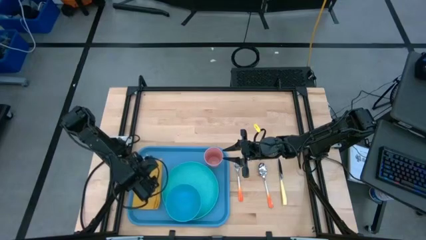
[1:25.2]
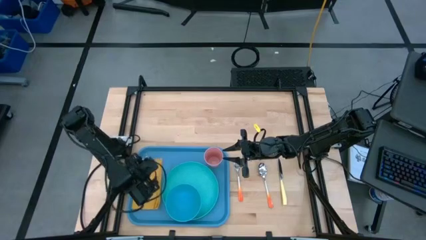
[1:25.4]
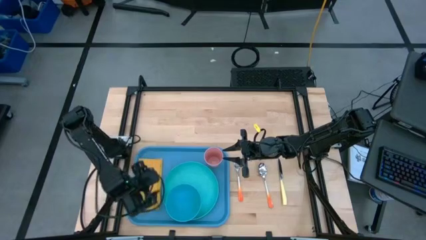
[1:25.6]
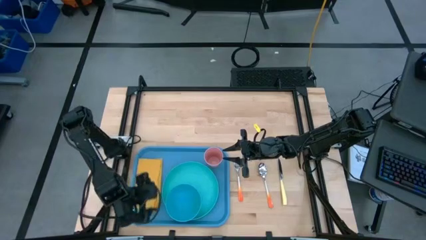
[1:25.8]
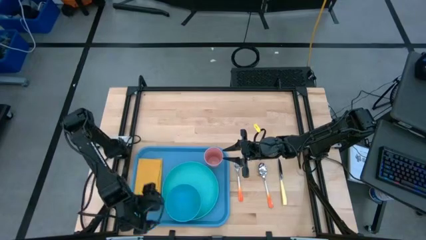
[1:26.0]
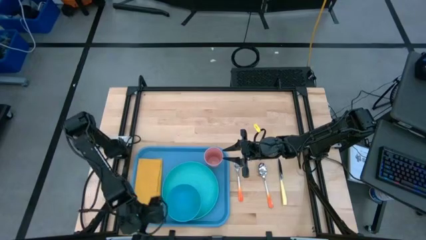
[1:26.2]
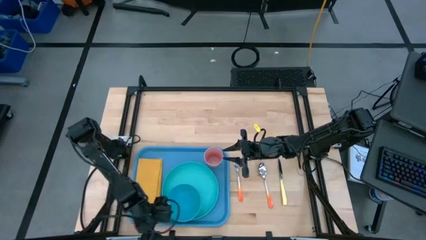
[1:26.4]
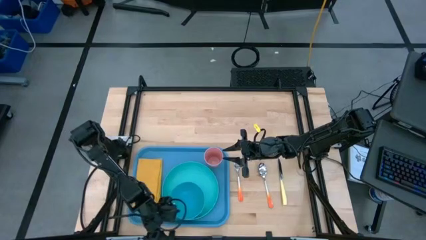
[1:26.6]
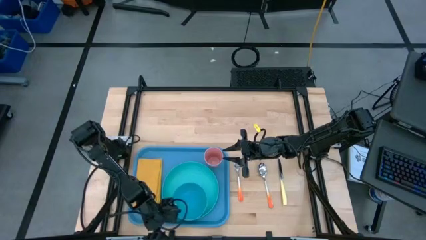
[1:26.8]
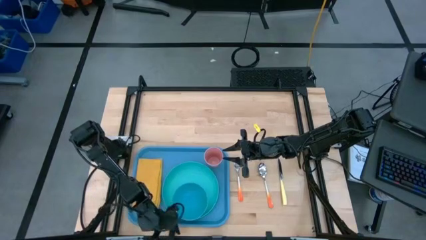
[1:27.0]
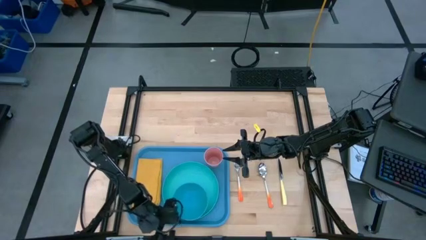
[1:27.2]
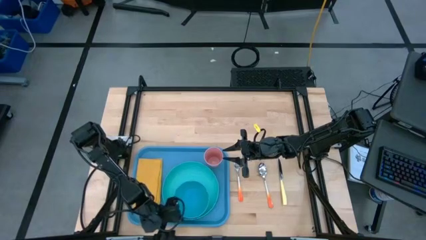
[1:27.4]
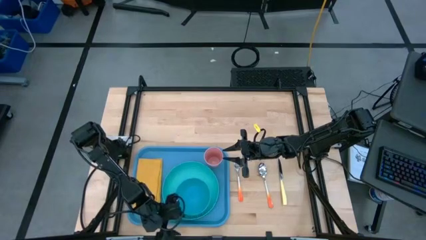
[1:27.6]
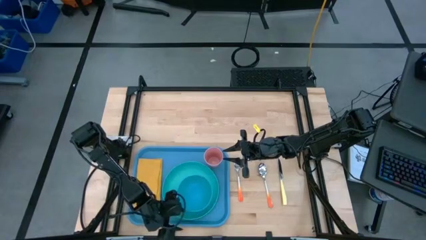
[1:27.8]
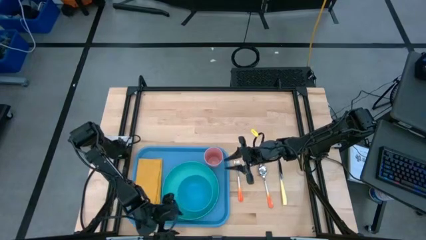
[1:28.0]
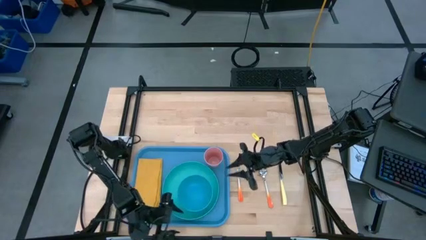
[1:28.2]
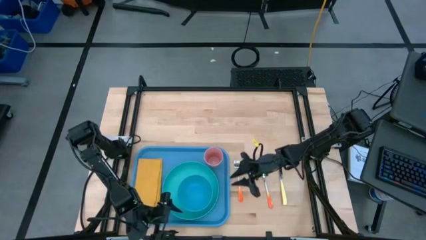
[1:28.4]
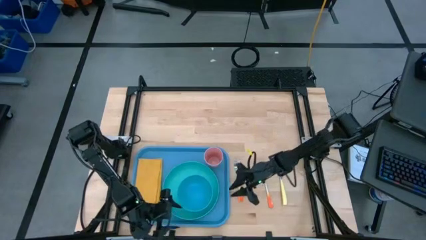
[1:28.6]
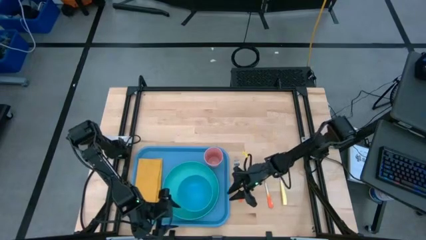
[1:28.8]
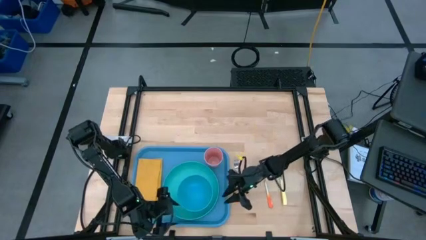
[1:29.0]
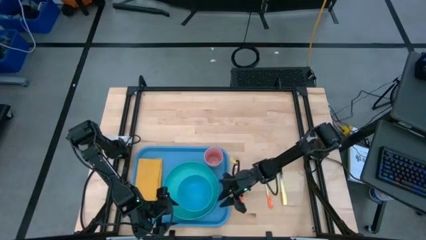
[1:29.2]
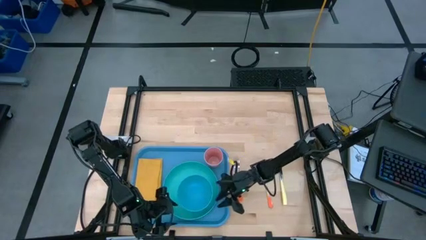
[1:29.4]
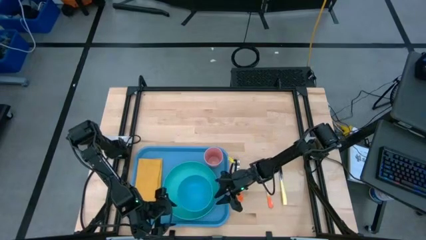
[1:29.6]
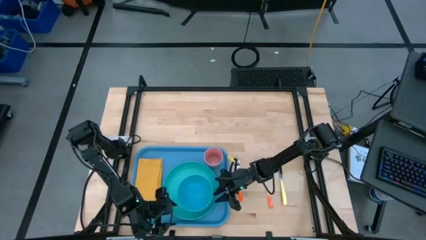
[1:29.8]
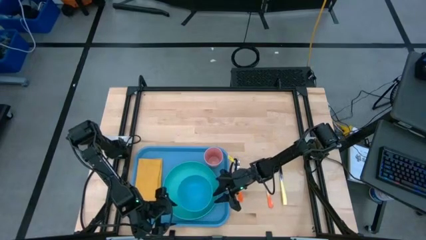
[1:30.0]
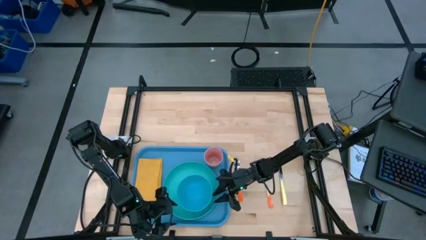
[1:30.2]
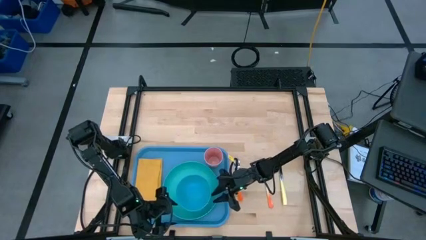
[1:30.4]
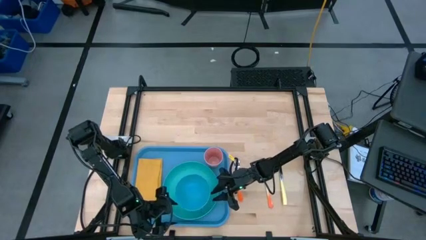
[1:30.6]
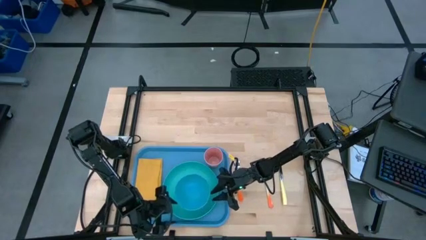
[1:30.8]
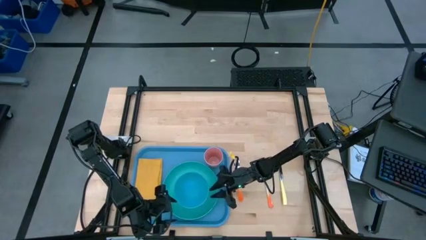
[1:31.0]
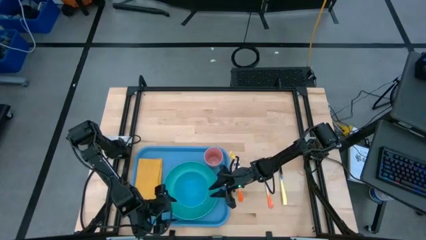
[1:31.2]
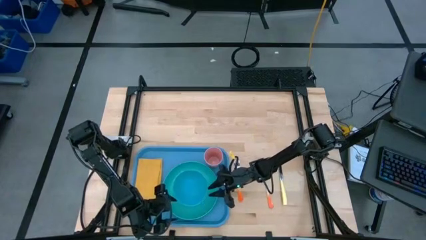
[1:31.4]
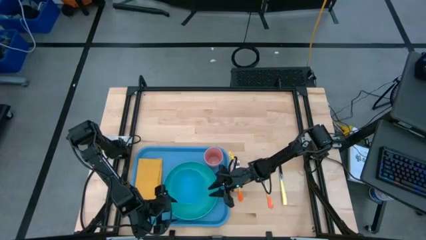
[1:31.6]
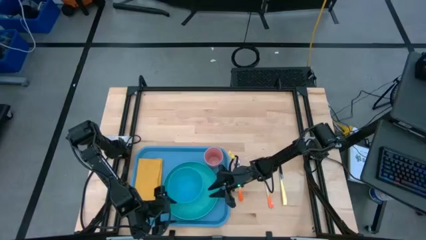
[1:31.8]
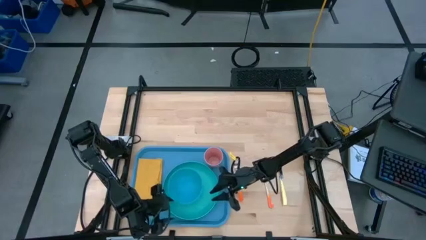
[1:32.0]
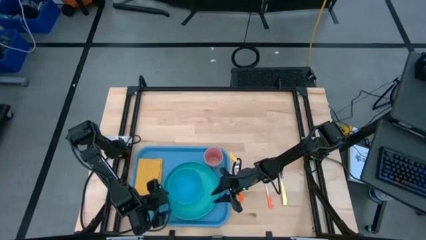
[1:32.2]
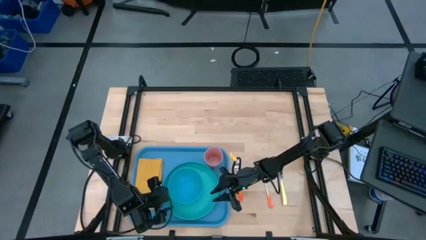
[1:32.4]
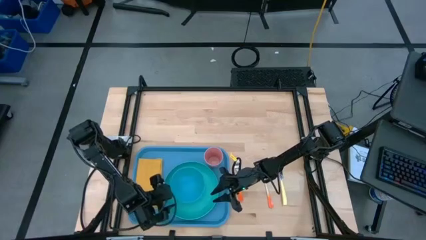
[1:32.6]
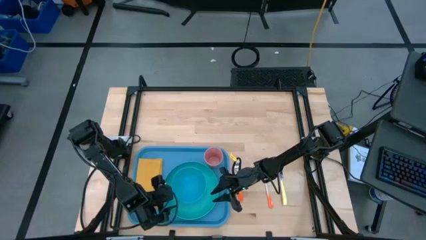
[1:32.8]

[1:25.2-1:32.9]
Task: Set up tray
Adjust the blue bowl on top of the green plate on the blue tray

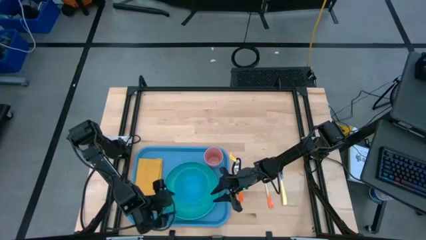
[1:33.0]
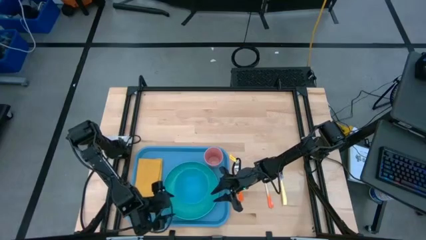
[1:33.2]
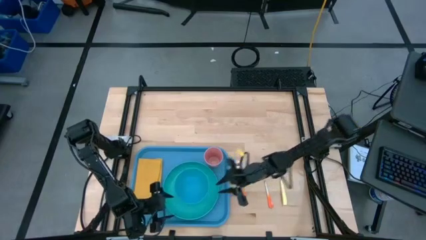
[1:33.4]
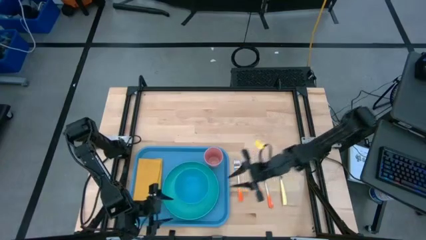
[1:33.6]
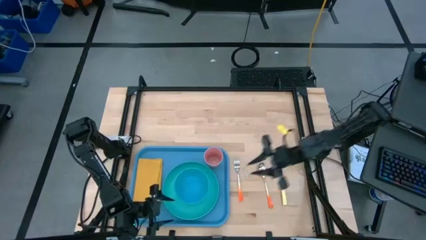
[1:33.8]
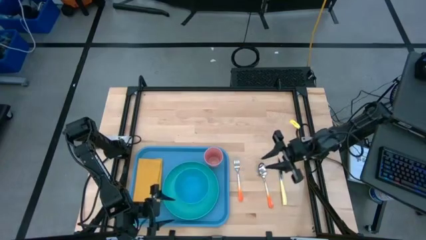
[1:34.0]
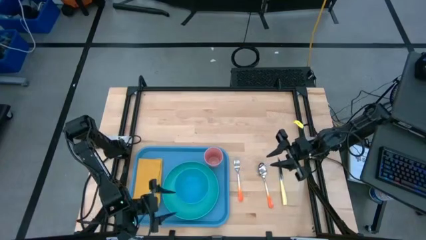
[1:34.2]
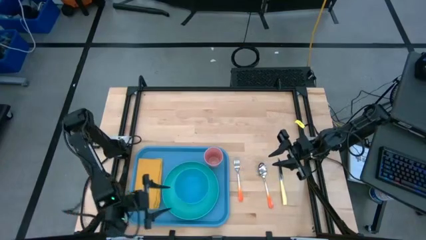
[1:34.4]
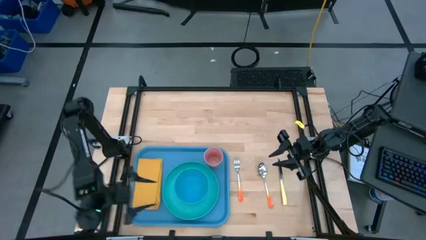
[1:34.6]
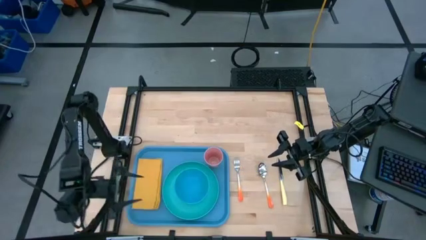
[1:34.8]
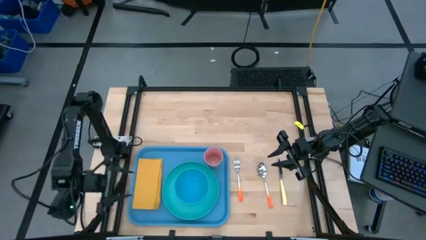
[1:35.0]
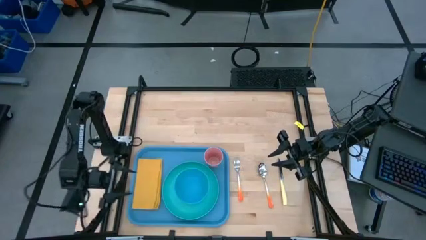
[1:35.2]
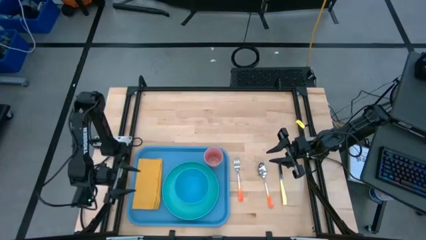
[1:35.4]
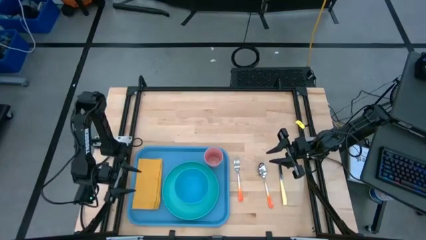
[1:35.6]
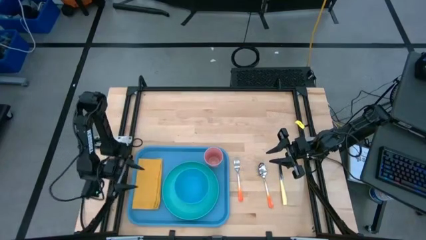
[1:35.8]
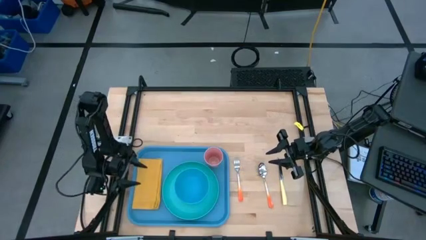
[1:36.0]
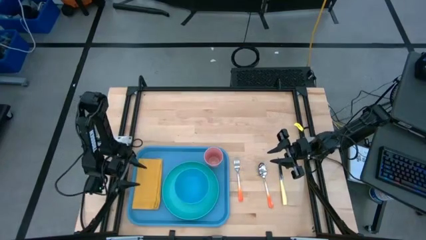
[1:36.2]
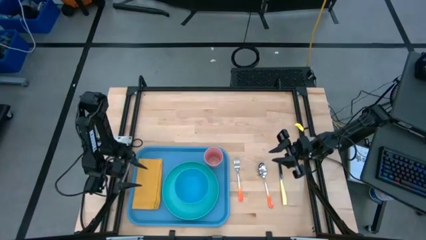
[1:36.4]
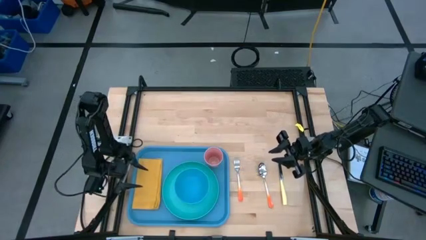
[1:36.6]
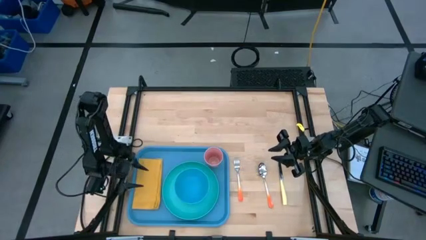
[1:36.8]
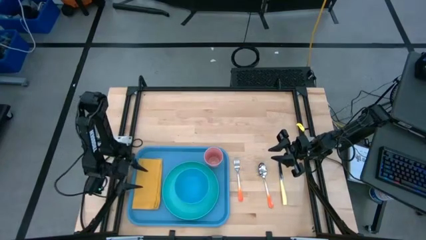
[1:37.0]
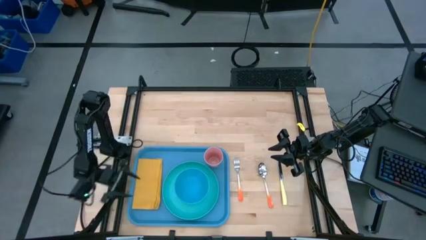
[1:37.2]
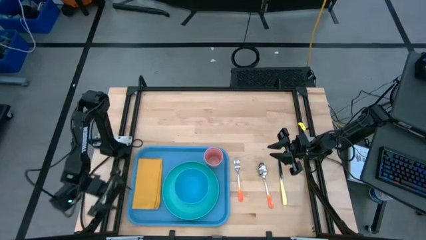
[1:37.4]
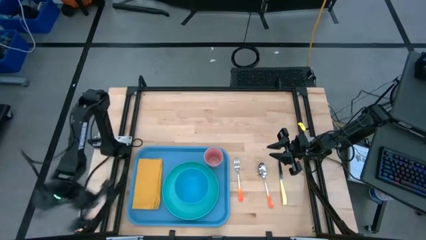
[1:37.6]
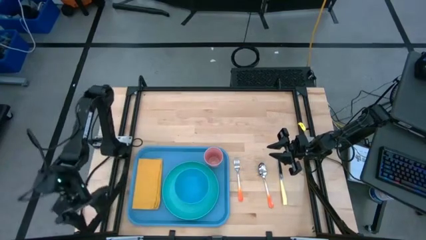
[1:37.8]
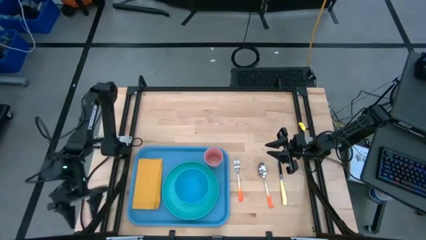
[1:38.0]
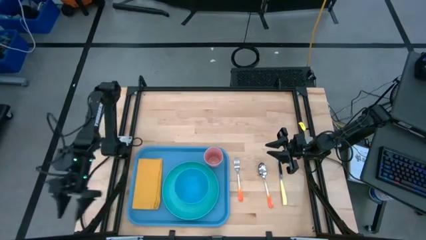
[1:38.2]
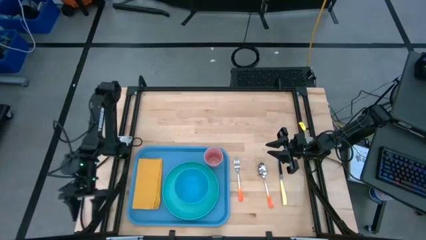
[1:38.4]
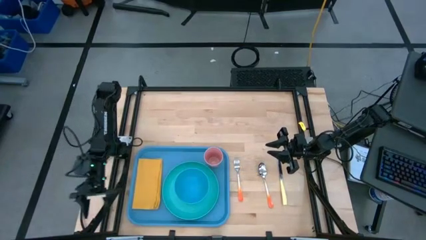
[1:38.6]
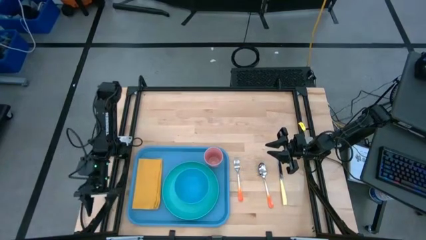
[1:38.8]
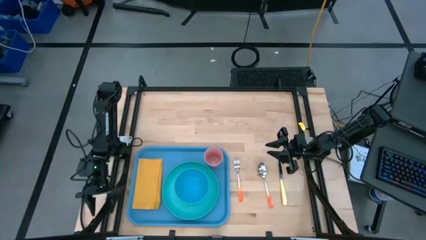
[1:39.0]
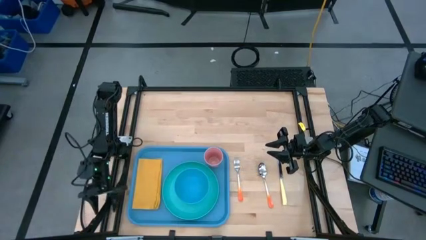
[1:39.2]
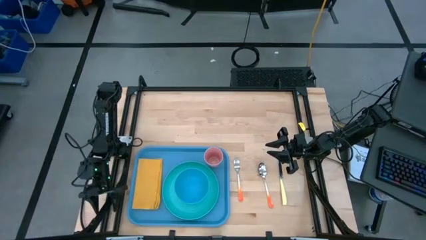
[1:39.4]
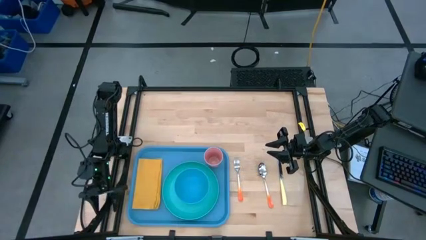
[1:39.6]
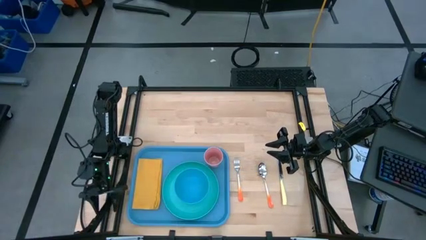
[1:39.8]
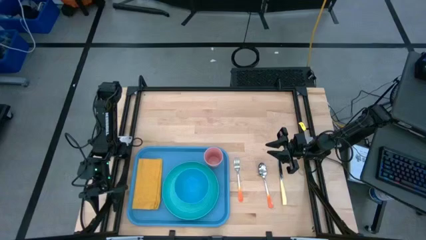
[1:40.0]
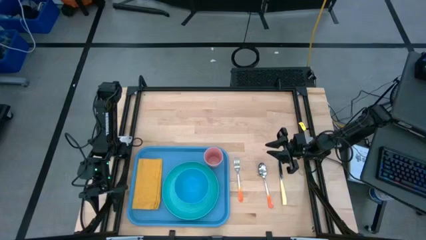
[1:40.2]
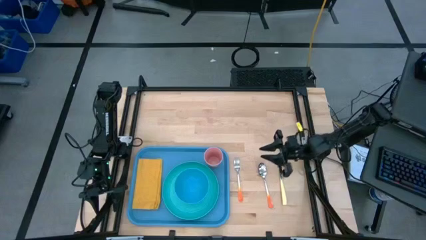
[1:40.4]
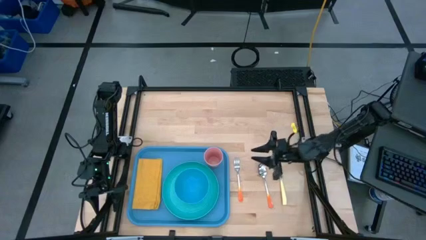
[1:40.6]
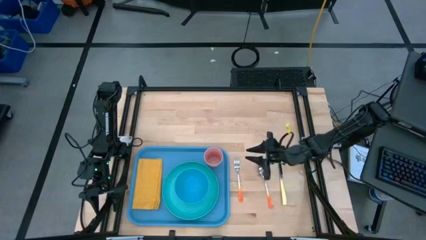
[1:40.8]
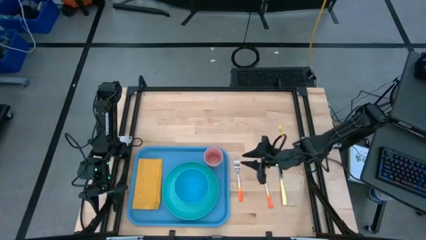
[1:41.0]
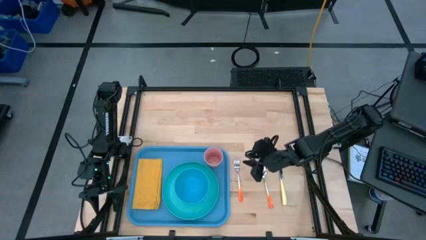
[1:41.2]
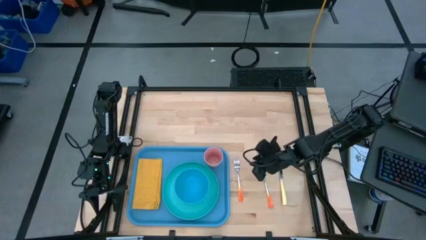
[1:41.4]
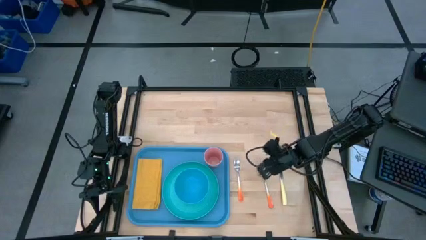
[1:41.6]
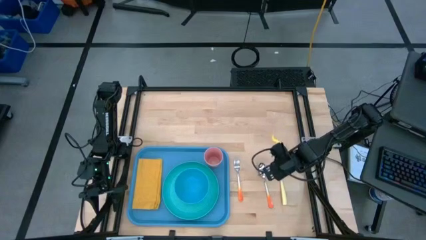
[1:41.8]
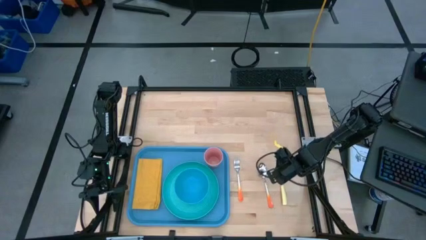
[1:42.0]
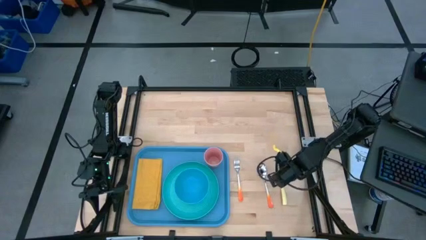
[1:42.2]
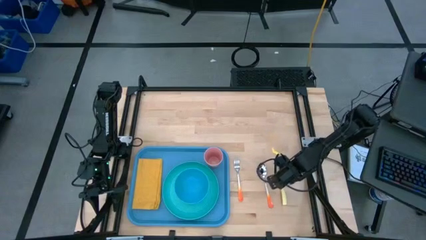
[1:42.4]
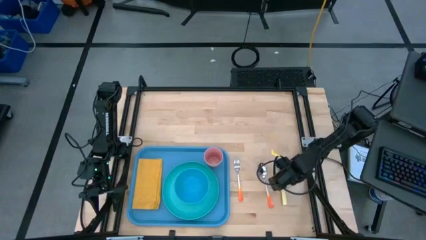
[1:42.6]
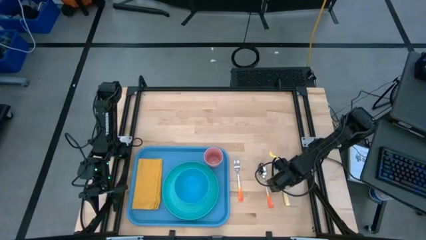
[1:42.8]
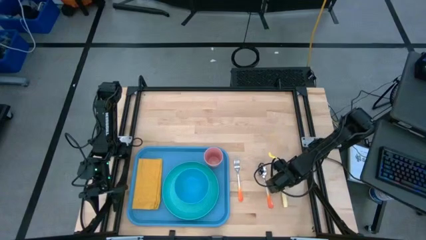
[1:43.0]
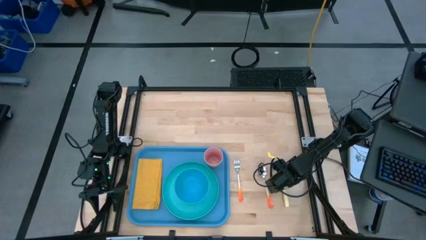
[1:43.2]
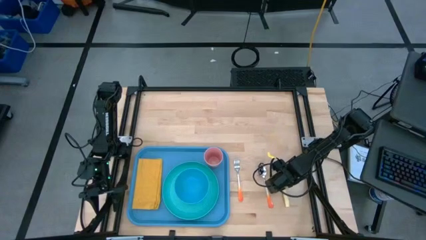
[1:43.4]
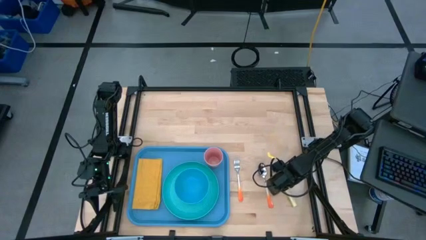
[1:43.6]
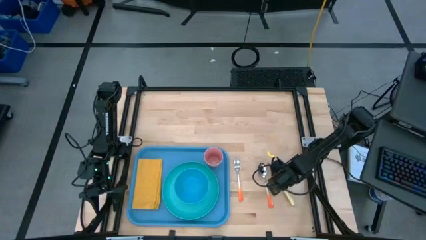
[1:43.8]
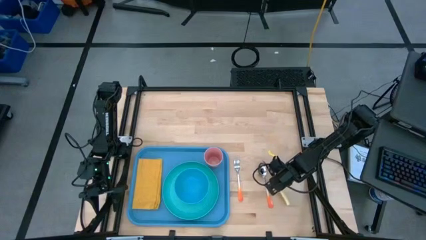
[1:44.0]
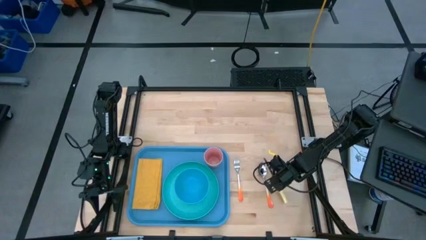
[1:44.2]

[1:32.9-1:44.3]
Put the yellow table knife on top of the yellow table napkin on the blue tray
